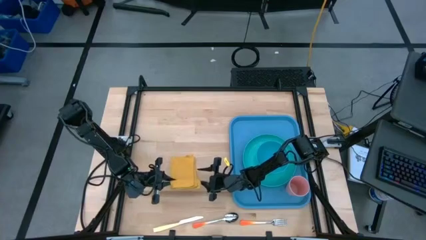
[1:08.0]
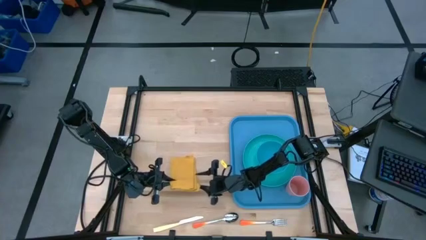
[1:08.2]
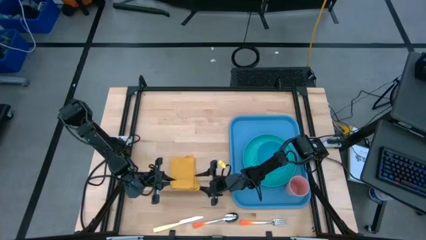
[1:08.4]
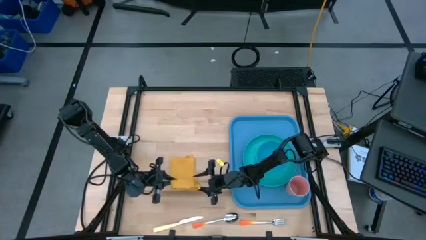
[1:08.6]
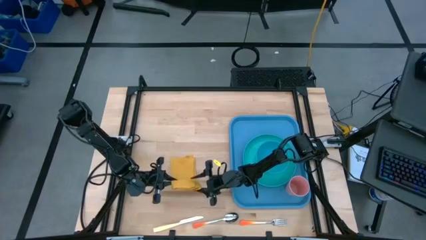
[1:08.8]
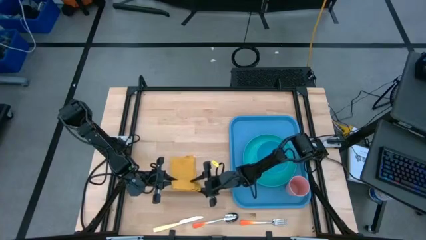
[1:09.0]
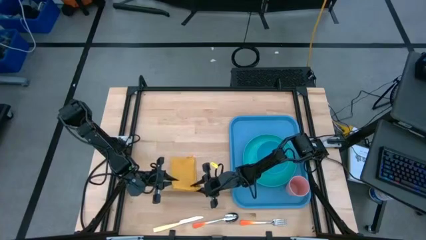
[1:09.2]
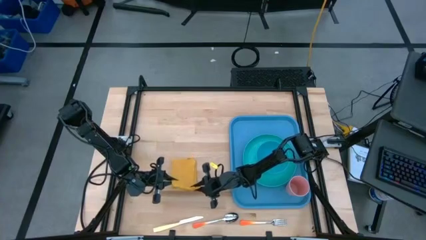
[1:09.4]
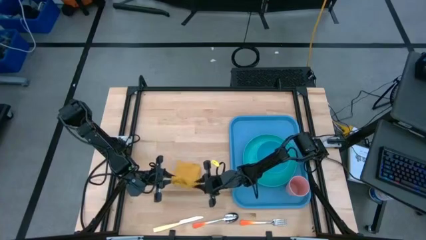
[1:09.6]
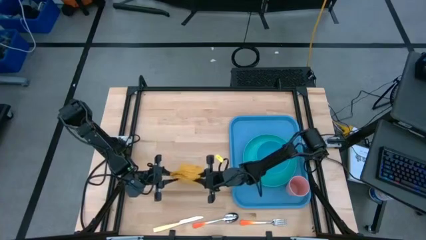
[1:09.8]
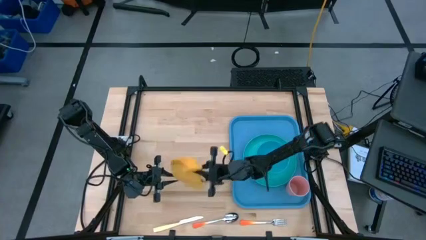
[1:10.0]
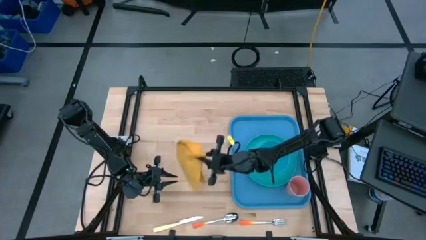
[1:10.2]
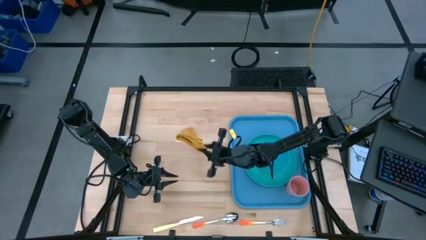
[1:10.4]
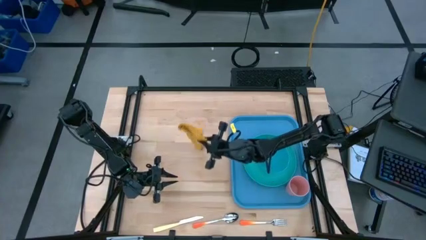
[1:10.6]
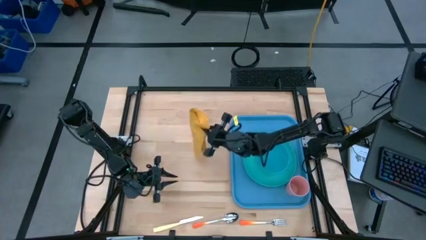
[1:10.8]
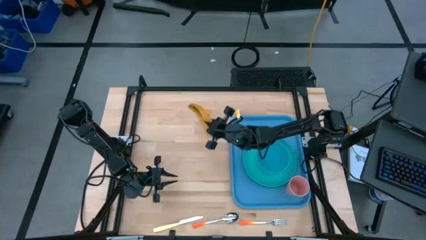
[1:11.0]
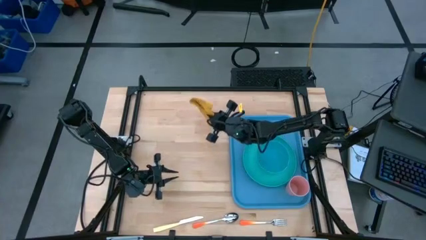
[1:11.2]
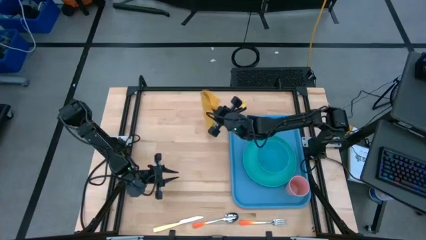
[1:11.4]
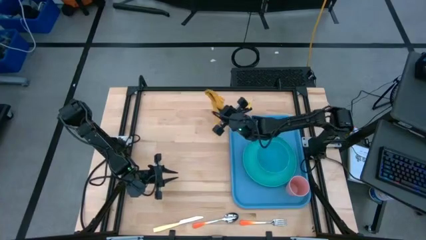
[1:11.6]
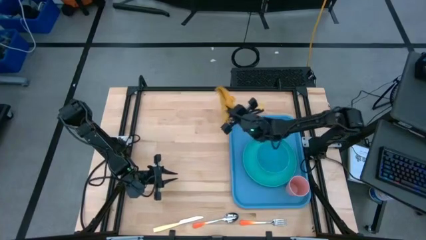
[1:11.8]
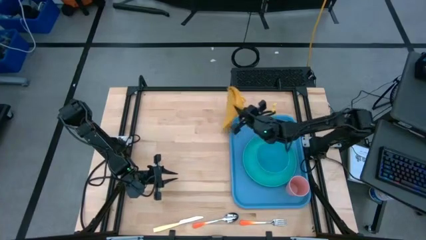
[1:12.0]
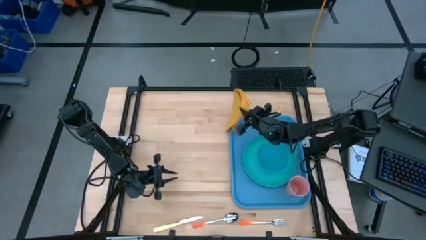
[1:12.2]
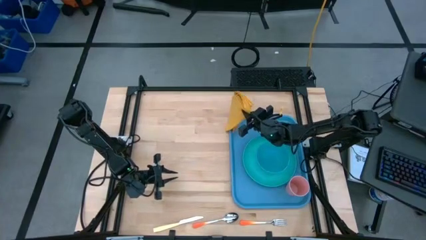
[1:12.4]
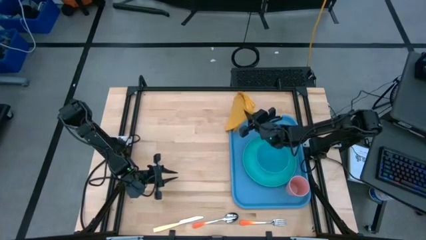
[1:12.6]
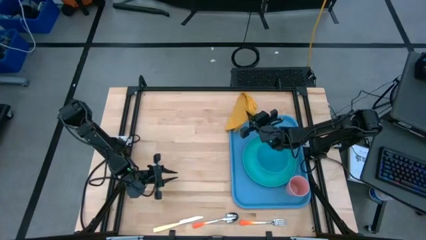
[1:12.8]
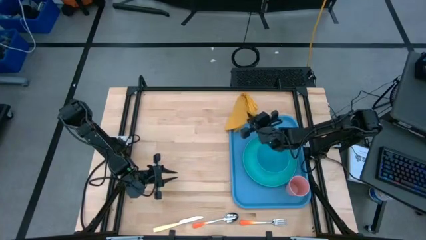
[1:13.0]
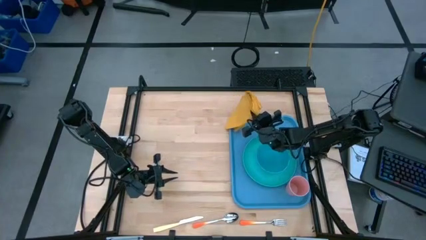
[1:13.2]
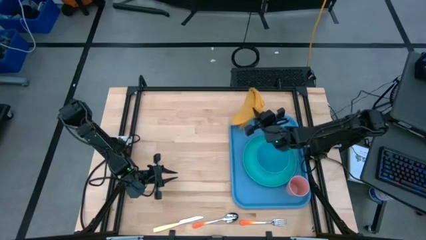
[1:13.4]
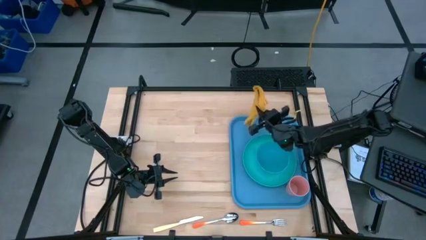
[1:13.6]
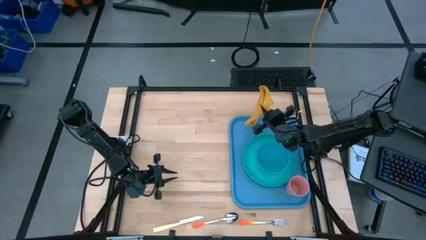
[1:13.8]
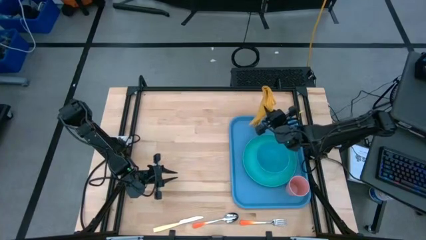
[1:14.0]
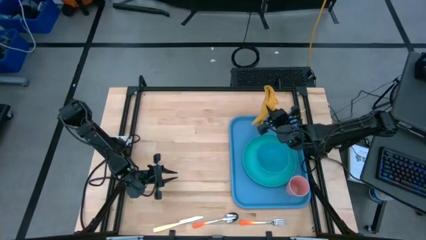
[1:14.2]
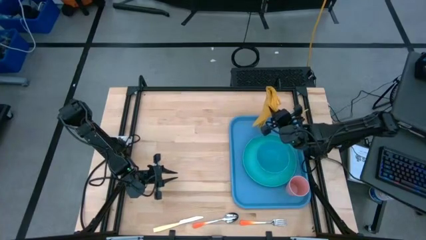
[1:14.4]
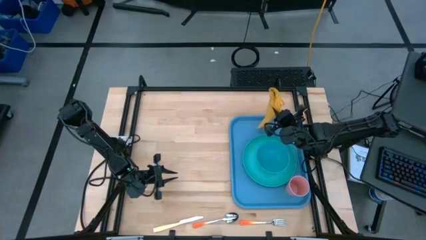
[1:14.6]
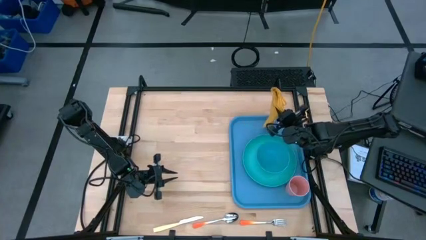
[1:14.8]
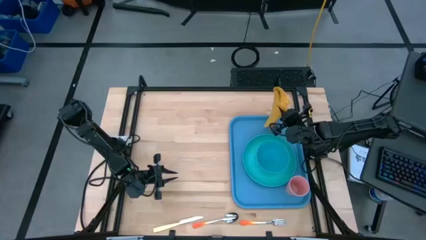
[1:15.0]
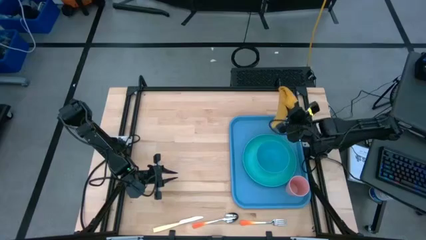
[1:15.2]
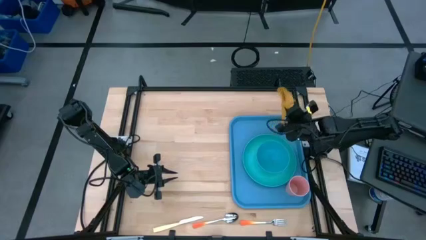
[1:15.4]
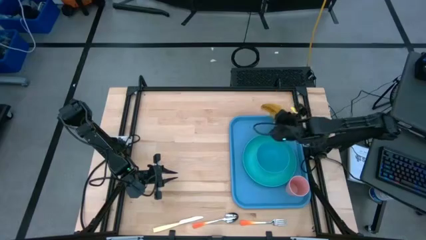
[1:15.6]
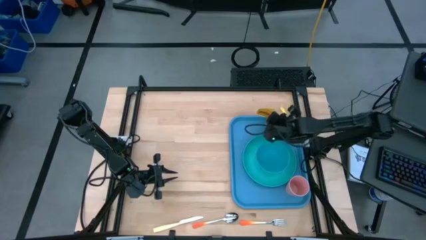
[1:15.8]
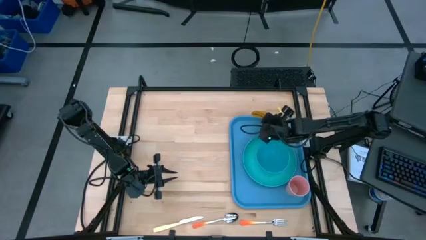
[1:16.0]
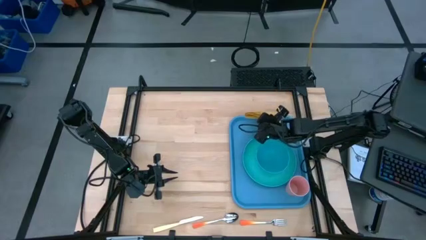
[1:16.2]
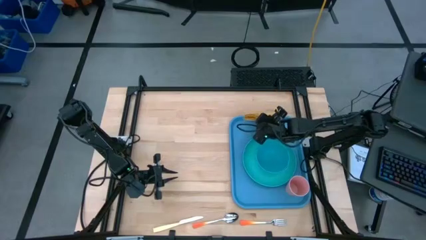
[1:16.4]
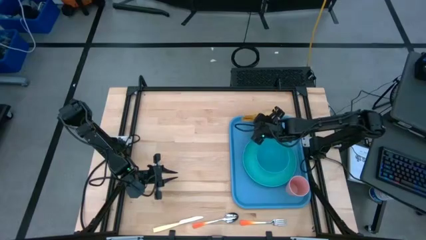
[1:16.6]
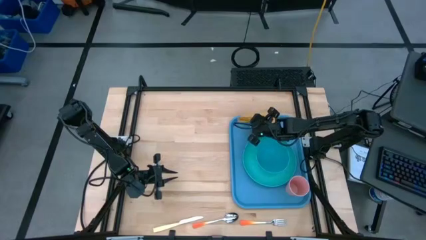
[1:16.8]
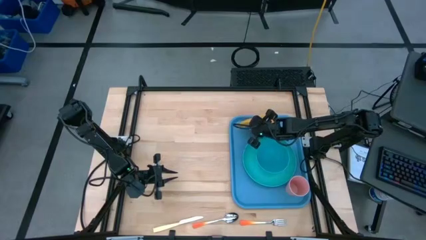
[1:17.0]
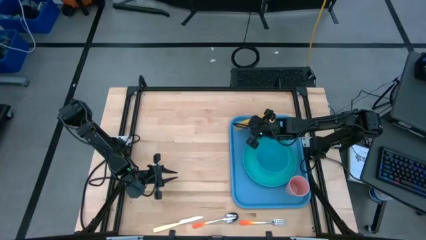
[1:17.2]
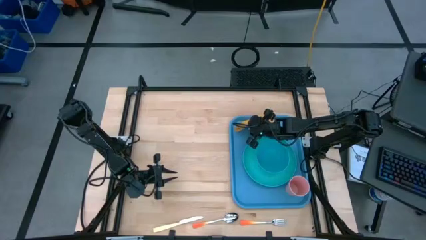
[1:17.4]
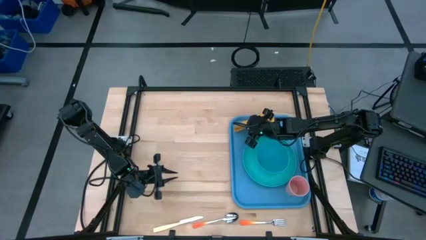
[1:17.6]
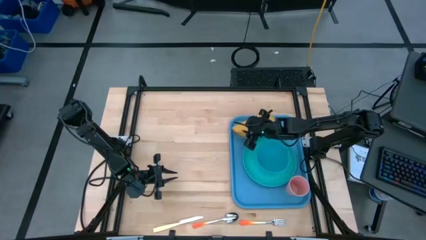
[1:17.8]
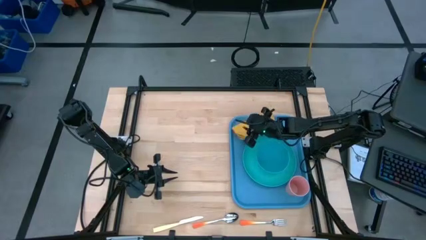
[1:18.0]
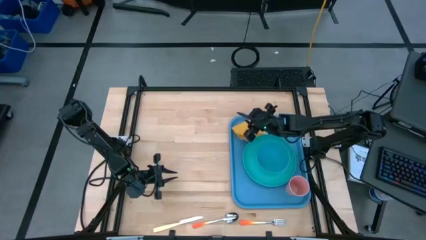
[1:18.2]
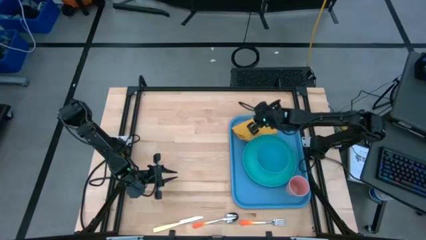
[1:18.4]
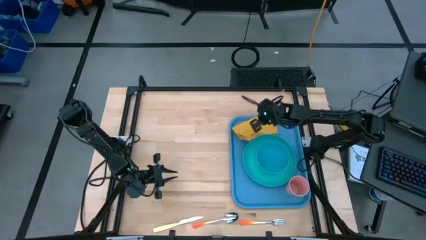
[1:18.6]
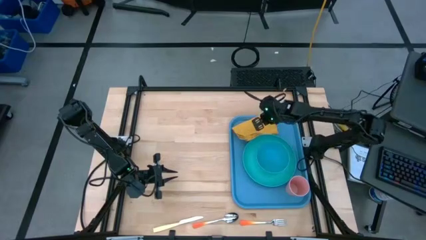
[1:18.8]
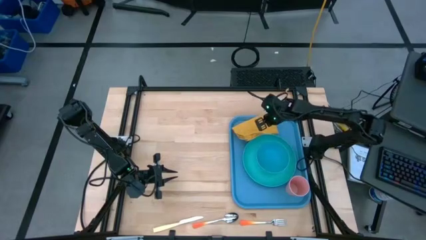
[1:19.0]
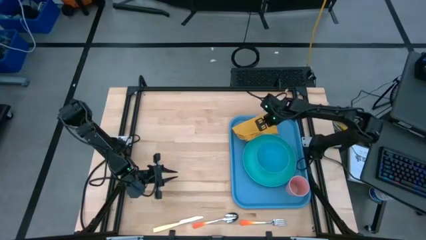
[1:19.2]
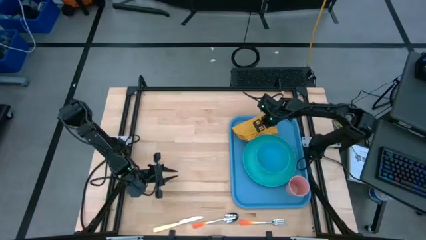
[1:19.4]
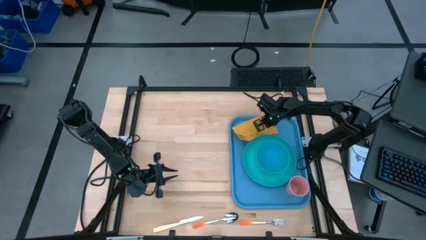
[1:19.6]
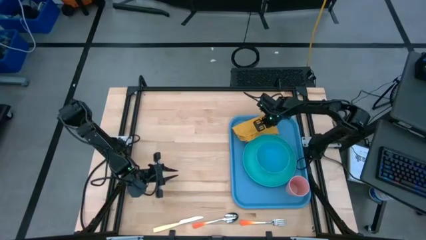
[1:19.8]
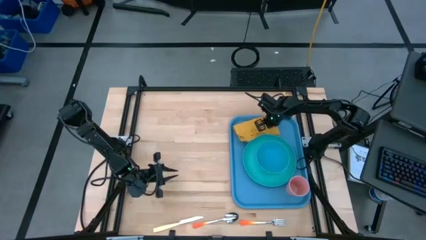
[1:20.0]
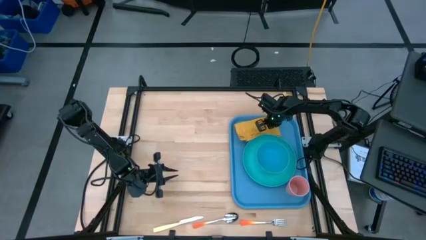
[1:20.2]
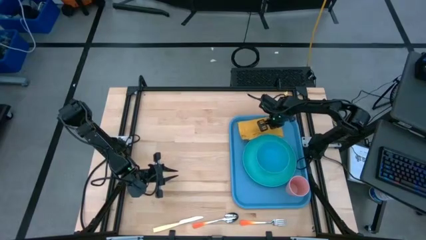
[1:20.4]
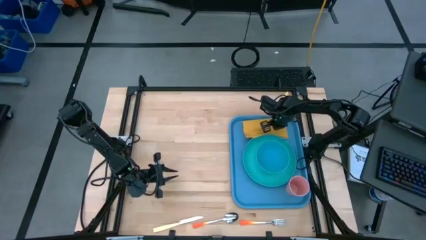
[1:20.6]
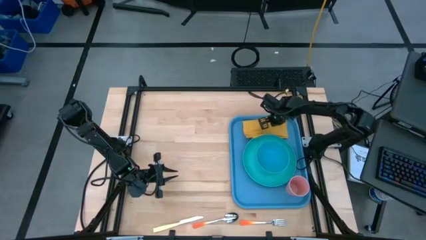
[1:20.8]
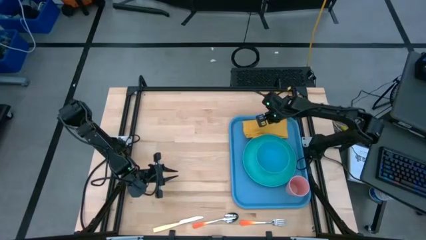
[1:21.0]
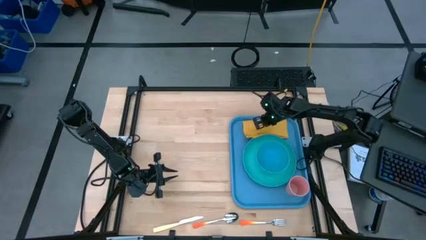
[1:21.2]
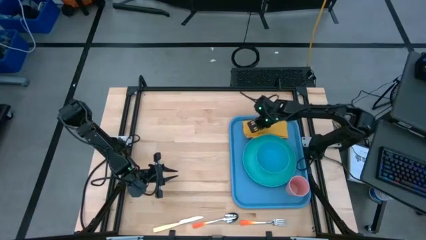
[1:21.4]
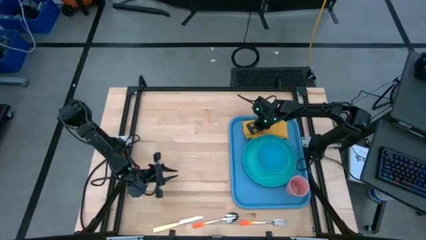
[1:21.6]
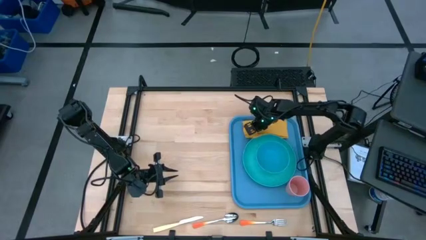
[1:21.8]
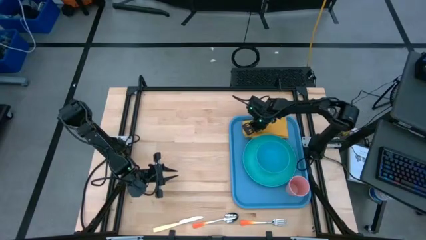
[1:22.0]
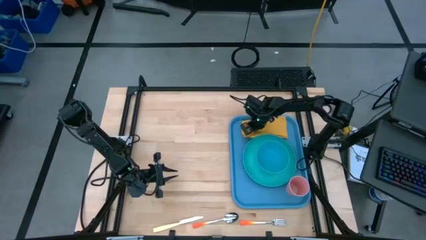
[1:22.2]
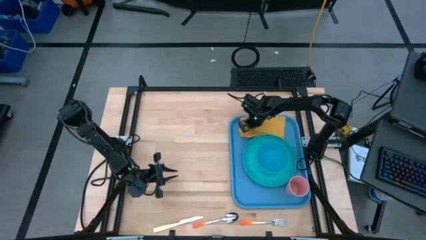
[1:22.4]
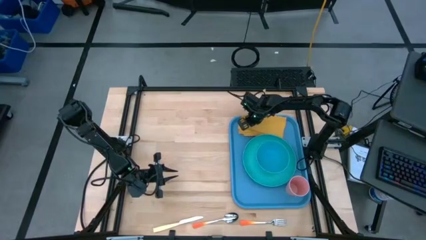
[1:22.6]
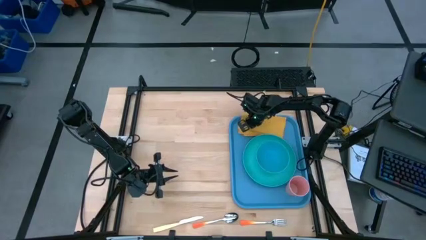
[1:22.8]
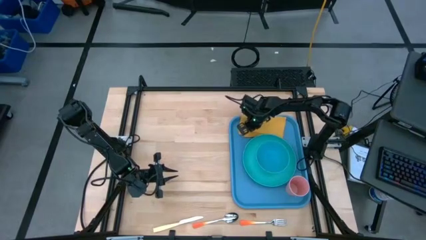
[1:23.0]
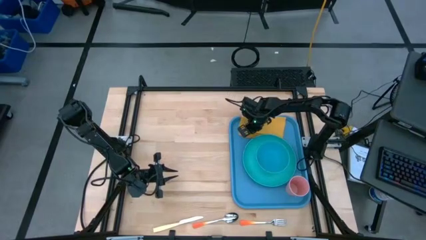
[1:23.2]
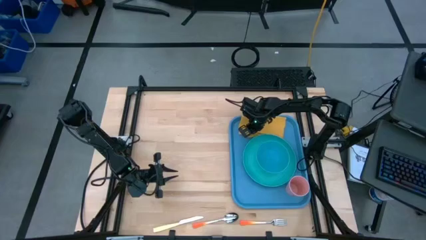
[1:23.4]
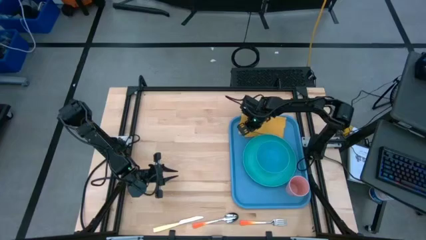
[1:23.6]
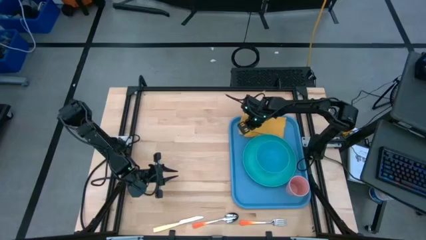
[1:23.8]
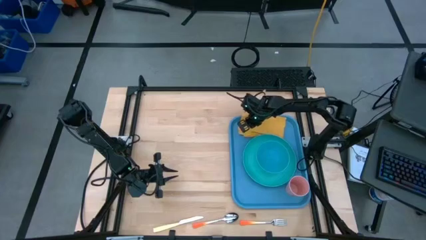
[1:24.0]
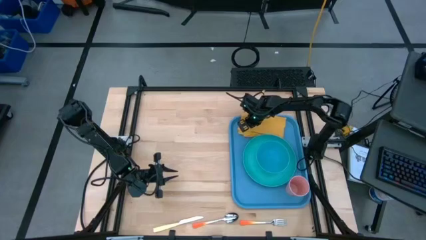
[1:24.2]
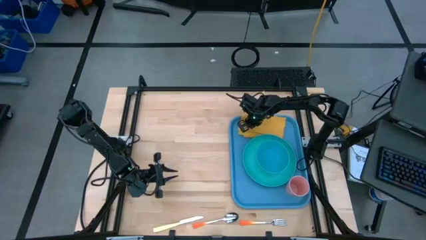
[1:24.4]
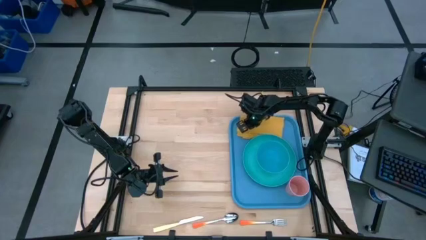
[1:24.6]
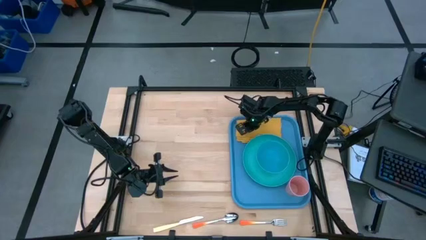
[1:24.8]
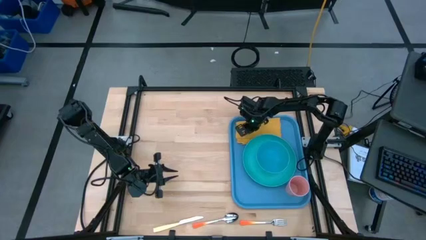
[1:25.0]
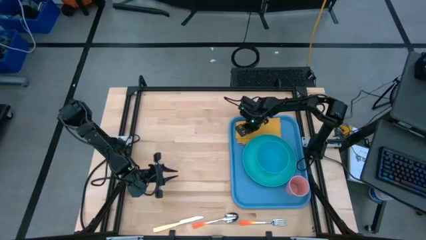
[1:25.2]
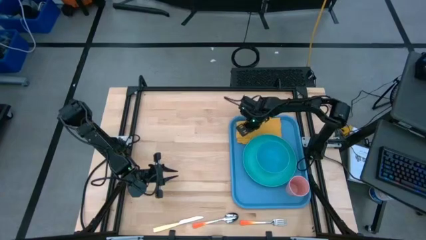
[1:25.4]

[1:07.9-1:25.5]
Task: Set up tray
Put the yellow napkin on the tray to the left of the blue plate
